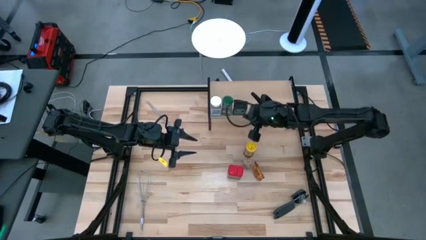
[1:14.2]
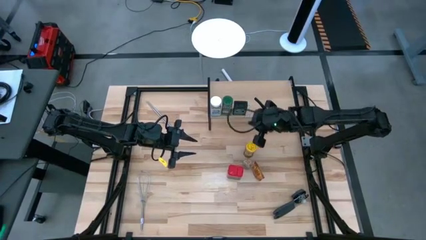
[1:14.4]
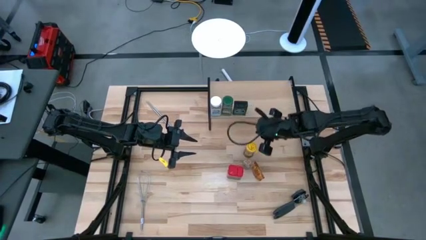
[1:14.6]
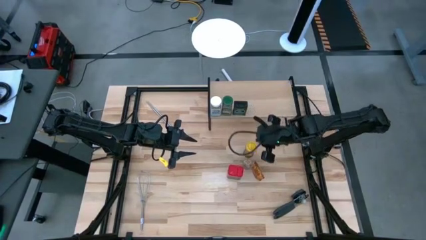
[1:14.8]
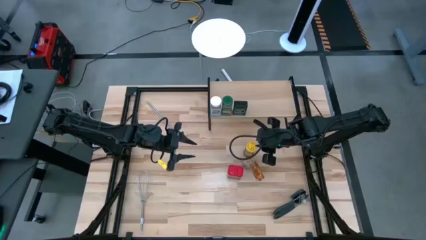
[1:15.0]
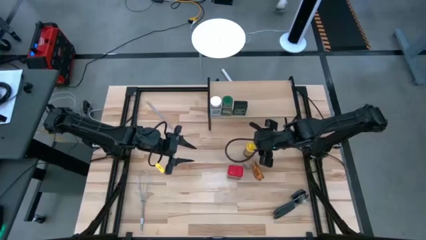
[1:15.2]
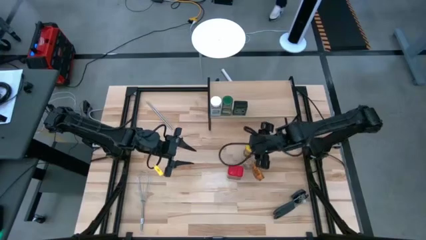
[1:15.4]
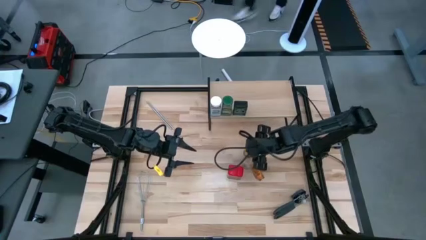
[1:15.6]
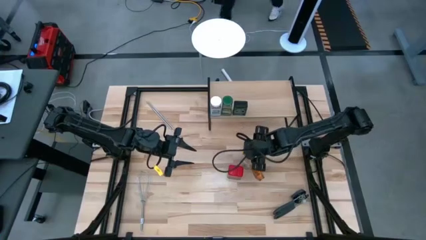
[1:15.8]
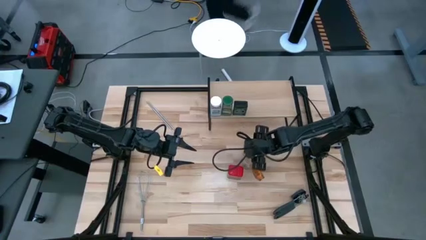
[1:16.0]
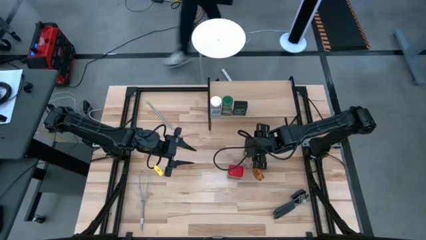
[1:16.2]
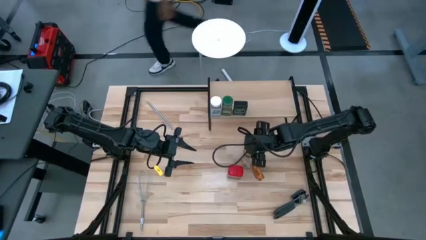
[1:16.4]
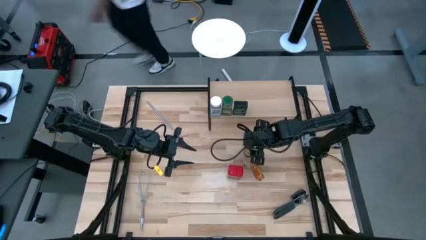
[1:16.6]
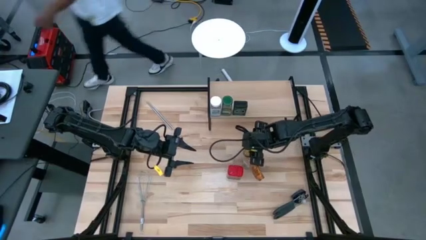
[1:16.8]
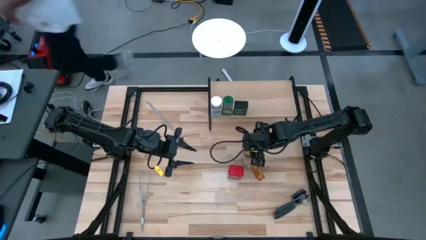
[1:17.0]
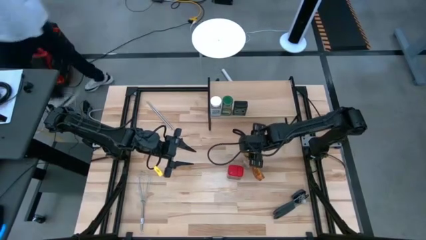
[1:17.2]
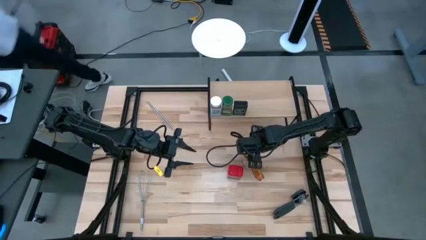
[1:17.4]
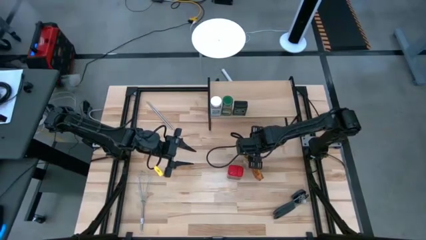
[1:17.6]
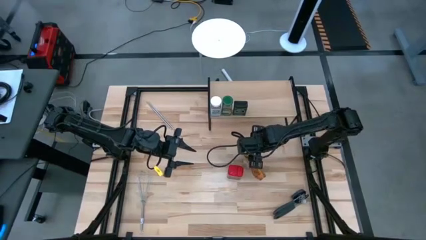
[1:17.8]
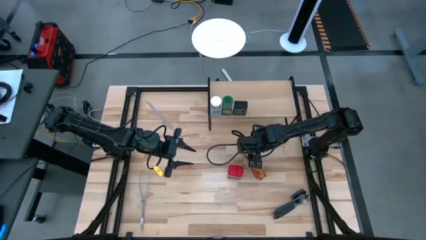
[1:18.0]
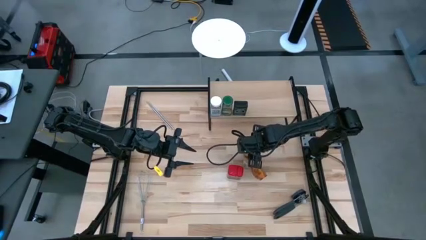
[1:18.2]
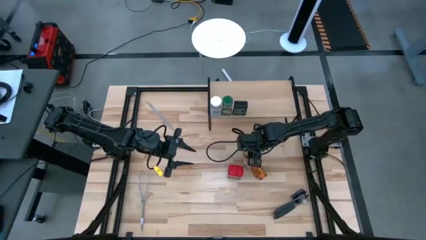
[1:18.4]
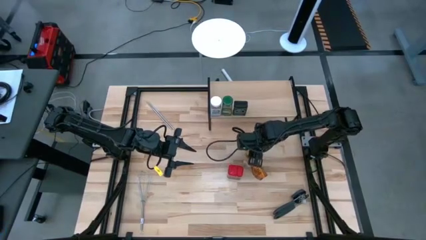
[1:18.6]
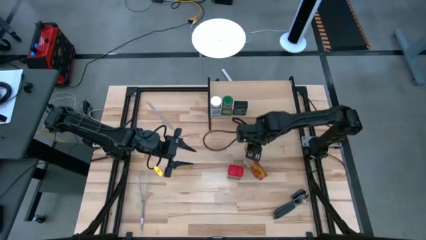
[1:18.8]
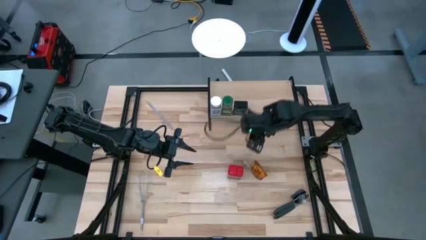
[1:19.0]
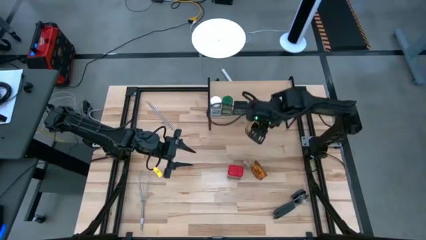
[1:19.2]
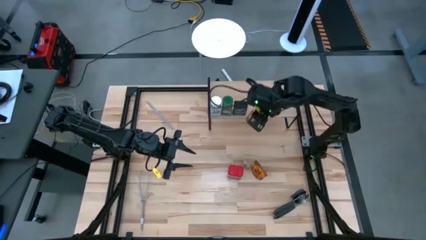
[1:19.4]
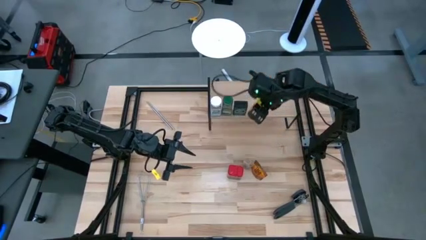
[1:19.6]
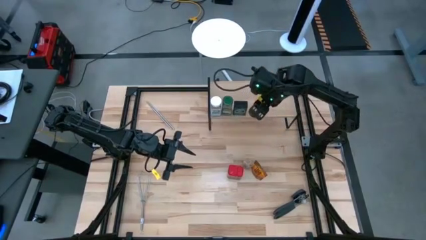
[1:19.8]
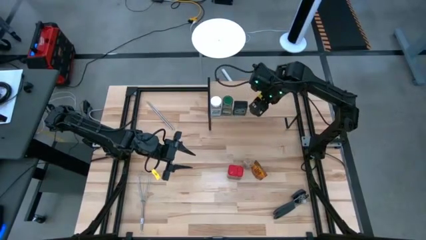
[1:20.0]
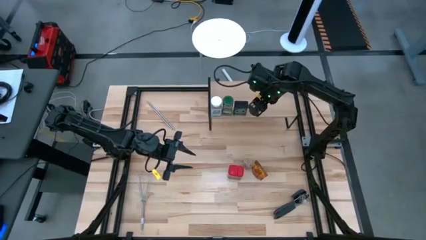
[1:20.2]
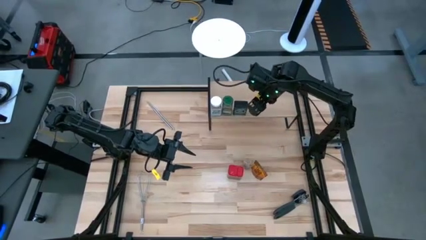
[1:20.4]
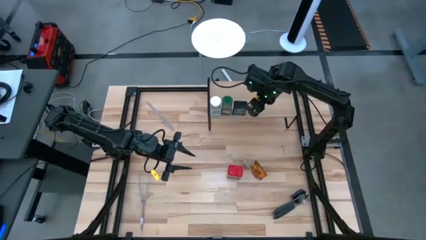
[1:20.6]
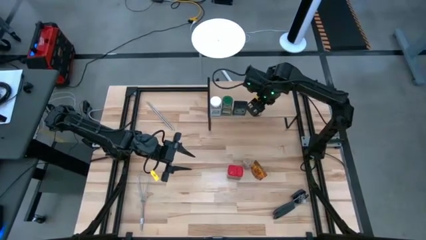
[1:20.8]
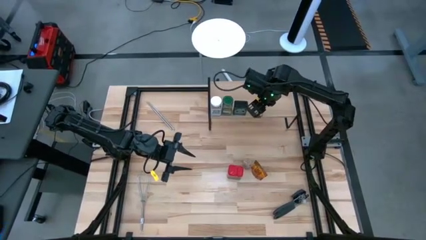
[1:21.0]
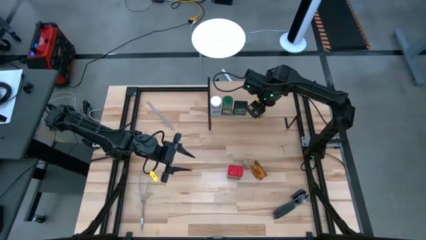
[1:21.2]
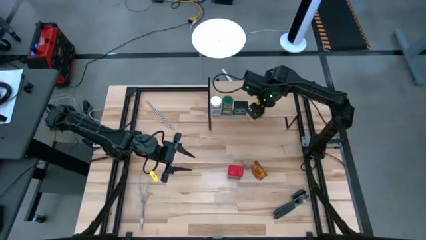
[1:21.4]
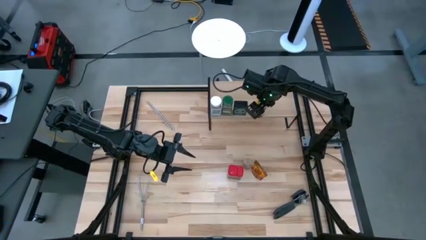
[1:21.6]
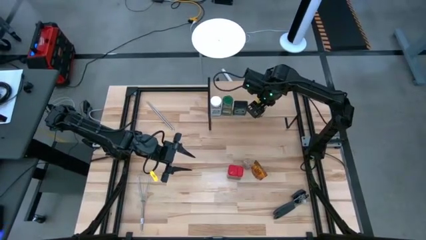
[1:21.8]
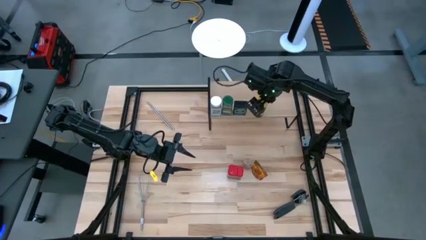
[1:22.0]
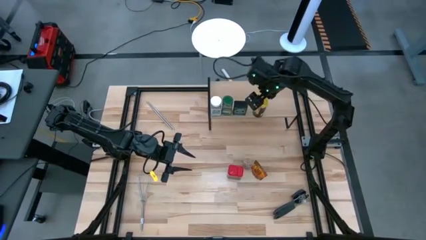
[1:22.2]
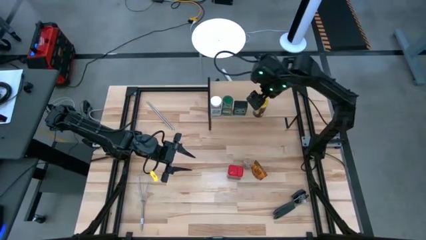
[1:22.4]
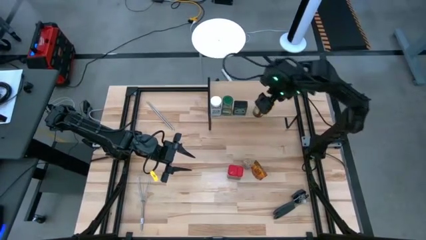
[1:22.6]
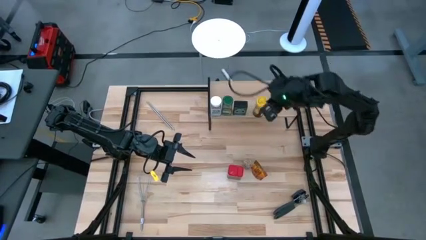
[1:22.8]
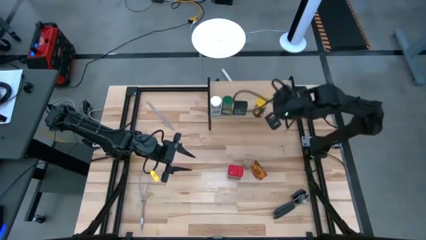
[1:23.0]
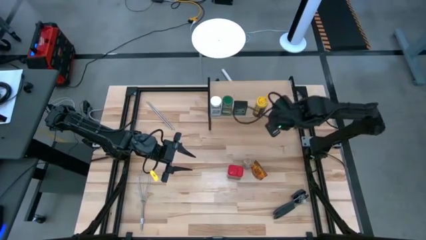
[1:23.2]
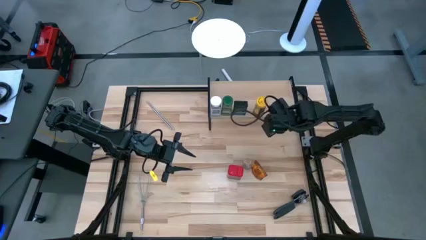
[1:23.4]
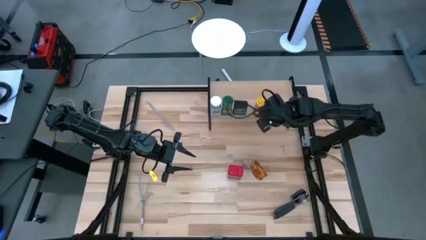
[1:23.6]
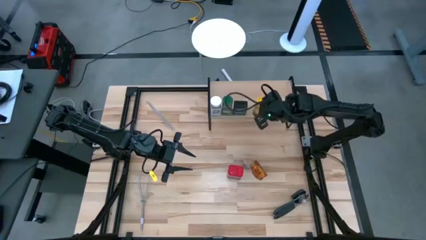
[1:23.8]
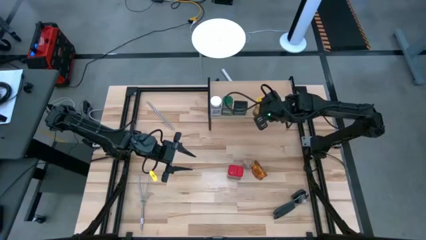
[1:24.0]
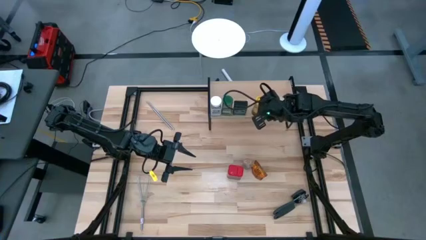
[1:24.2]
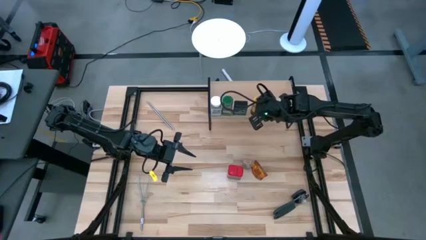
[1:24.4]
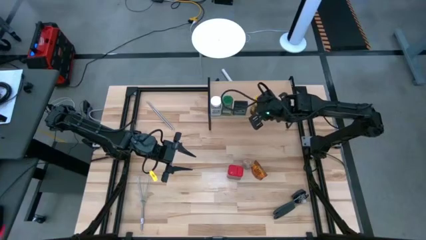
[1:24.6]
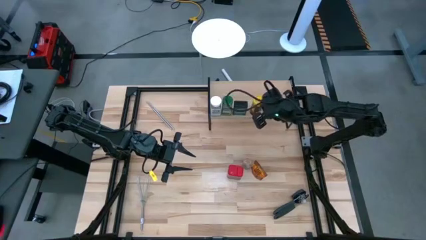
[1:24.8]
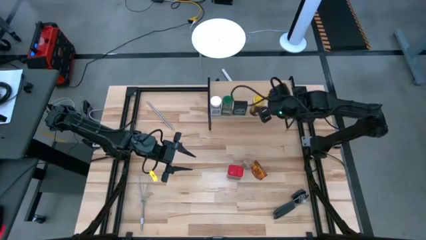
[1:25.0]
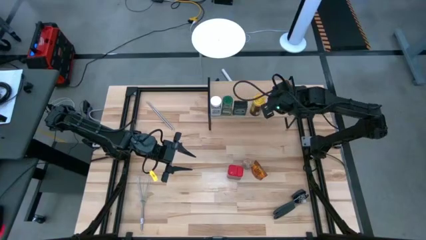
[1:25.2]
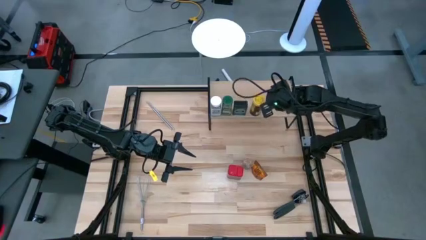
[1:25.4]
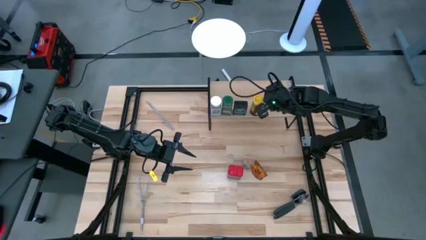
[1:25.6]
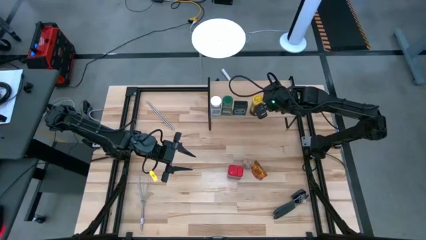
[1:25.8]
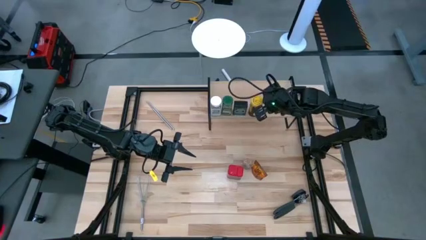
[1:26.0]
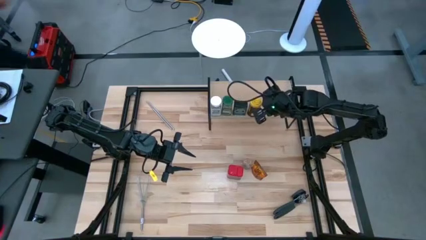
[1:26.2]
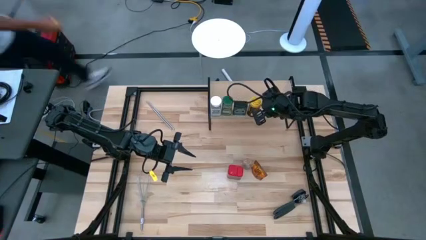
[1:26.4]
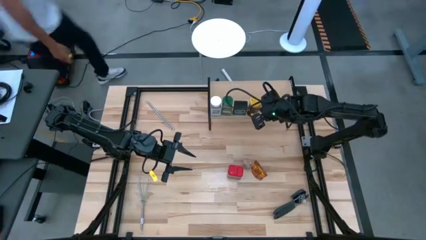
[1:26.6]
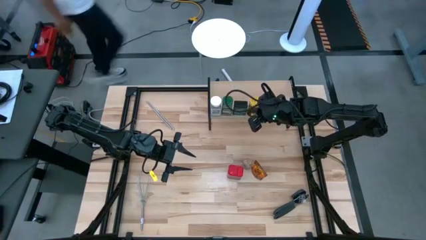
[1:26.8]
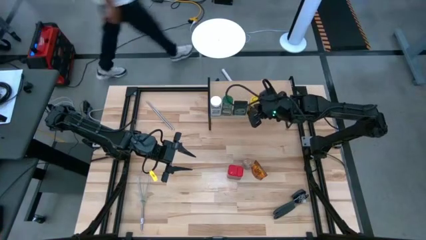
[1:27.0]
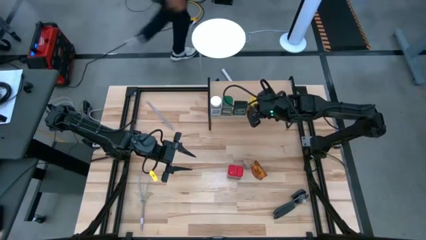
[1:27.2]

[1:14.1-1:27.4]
Task: Shelf spices
Put the brown seasoning bottle on the shelf
